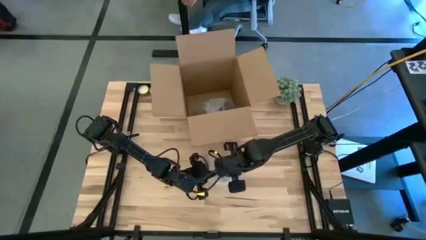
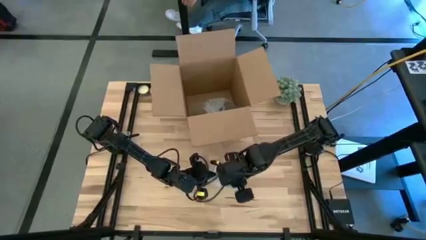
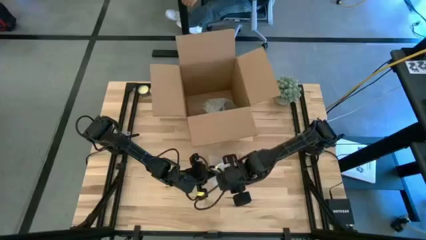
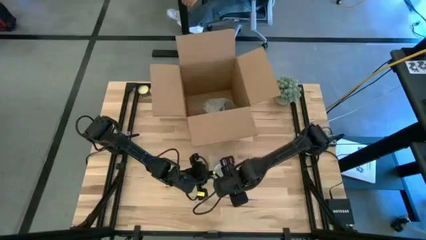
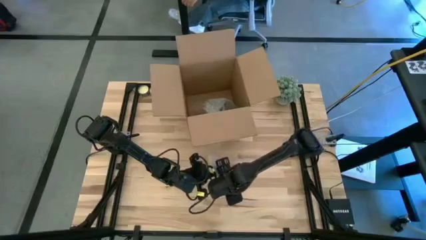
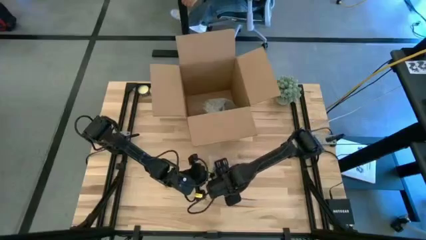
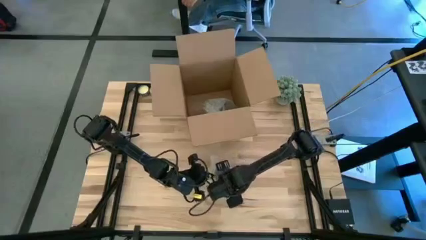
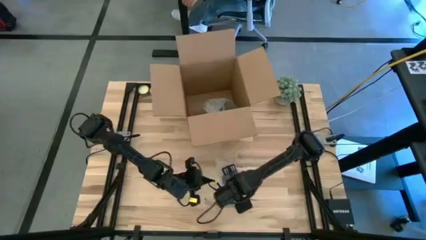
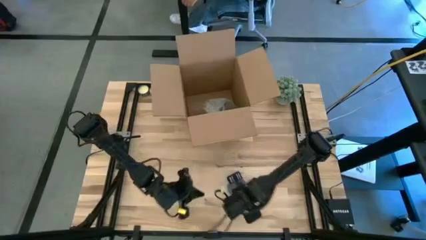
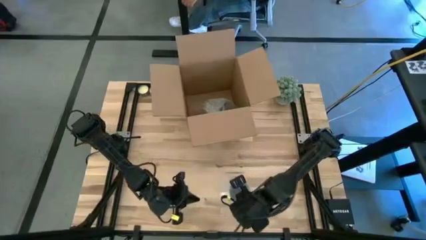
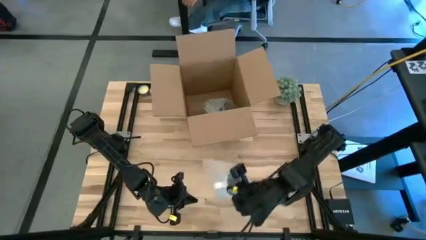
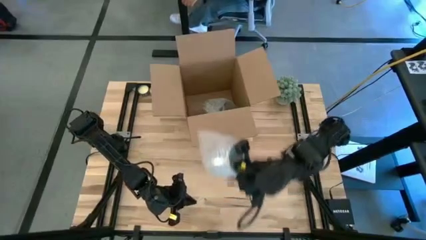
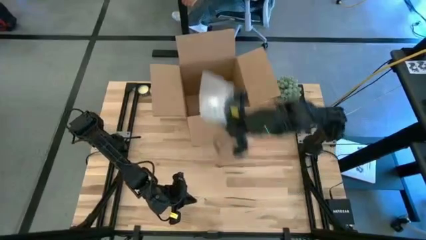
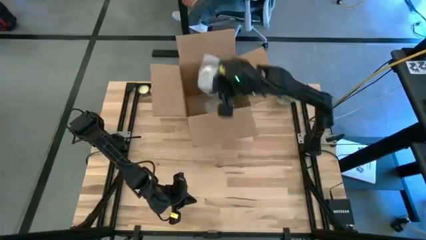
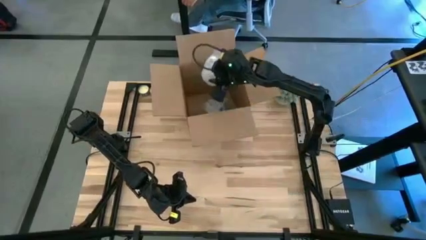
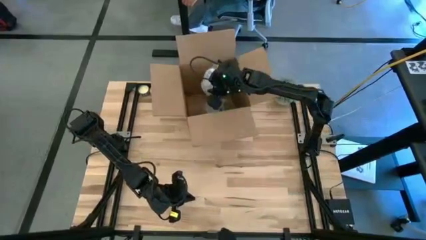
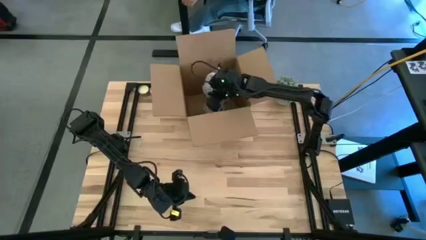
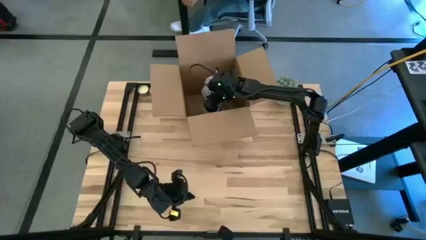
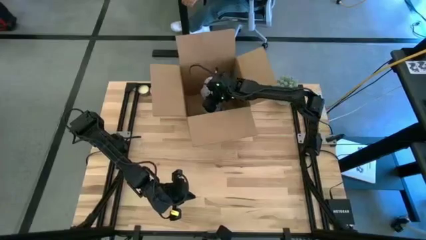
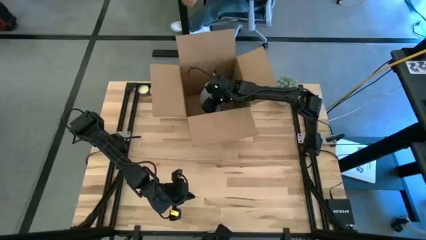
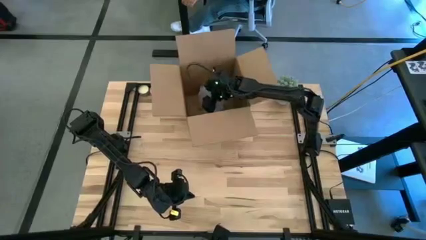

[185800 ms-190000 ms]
Task: wrap mug
Put the wrapped white patterned mug into the brown cardboard box

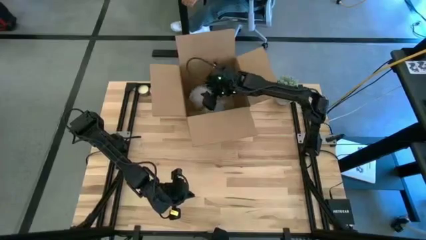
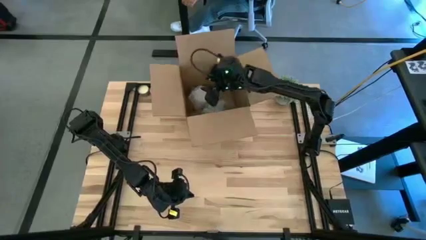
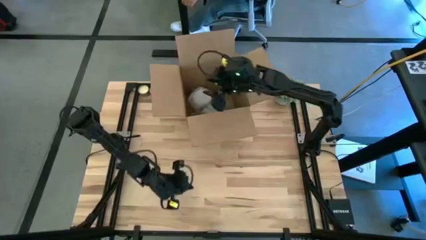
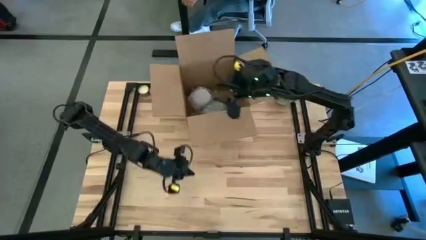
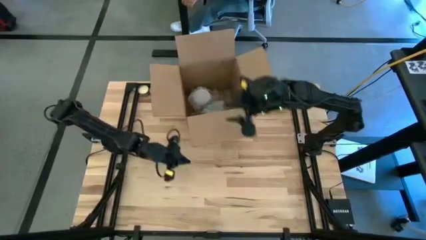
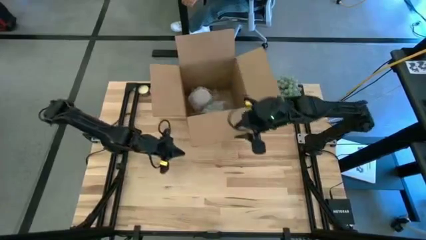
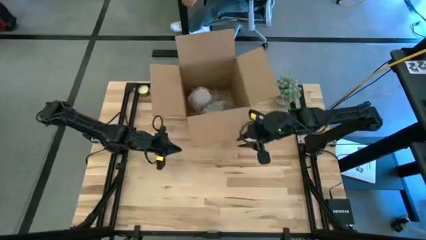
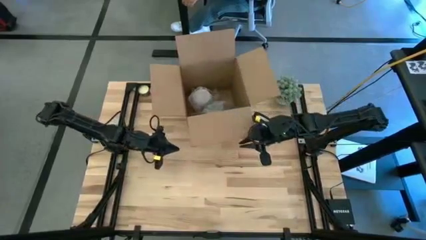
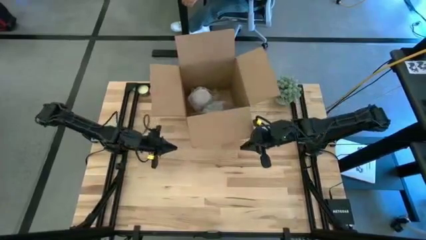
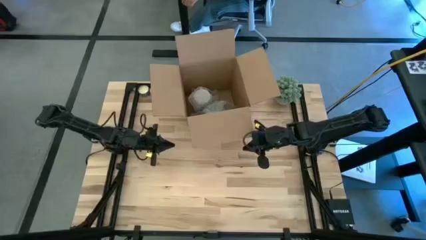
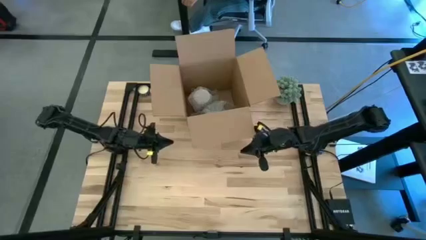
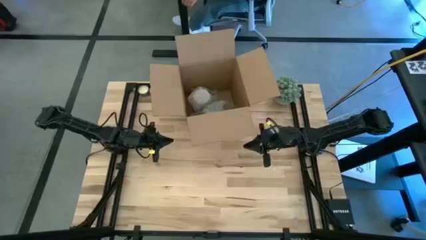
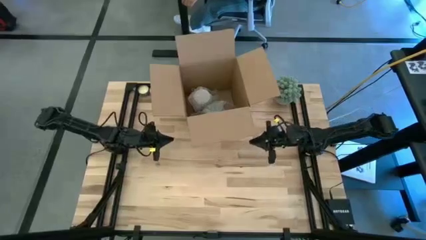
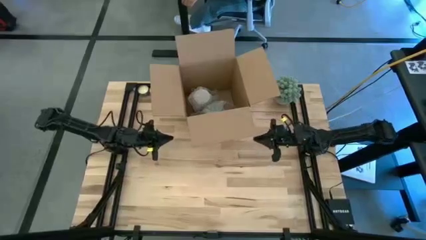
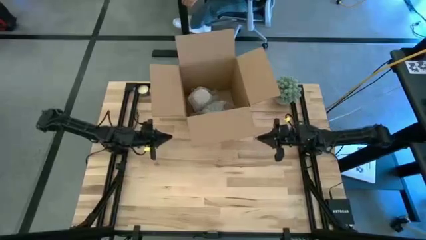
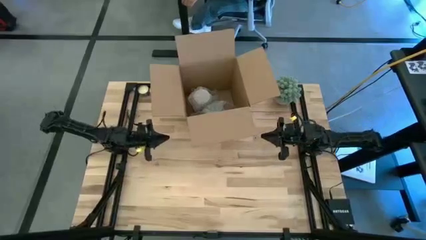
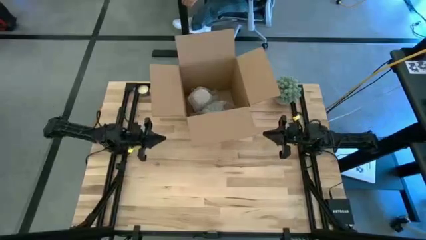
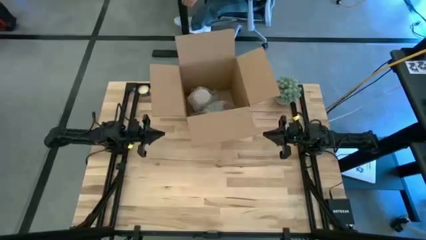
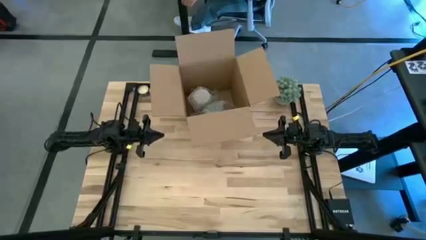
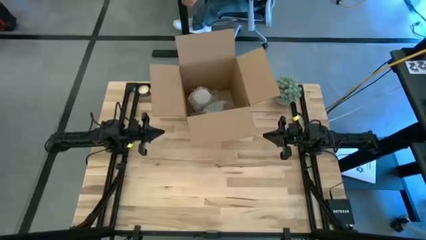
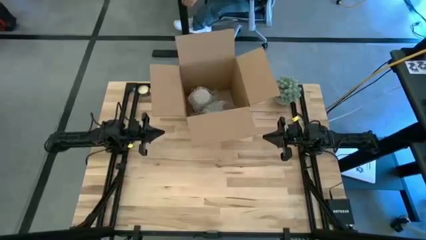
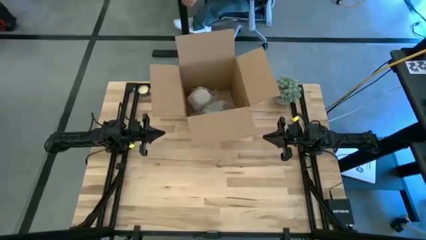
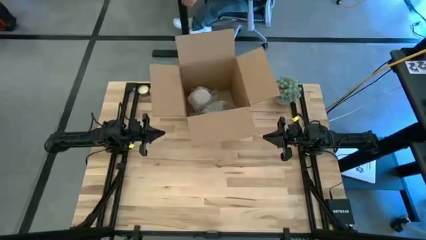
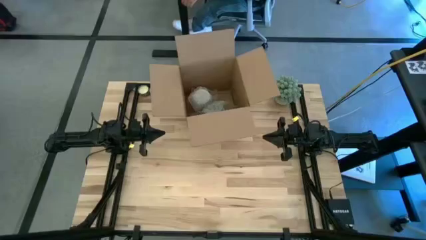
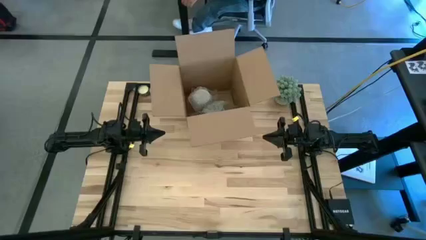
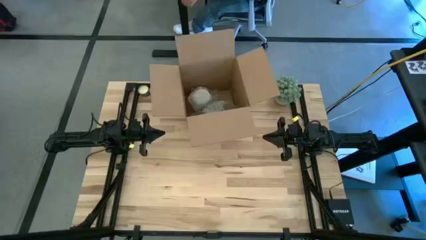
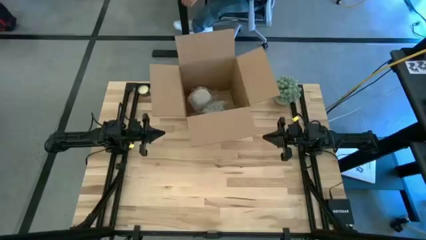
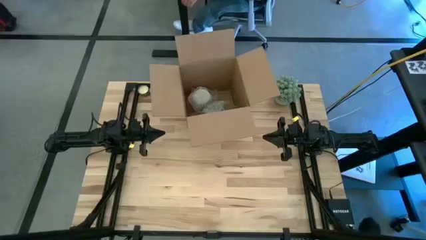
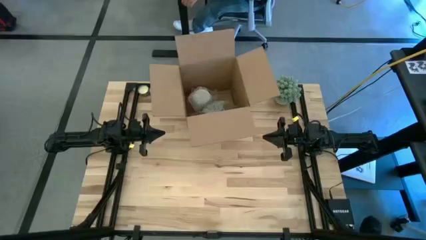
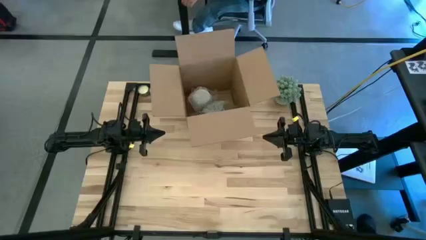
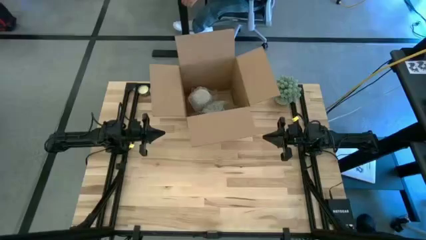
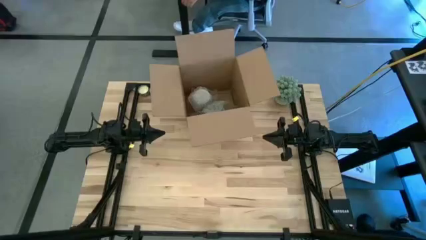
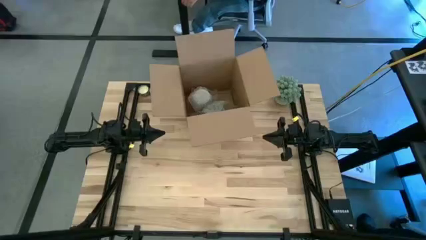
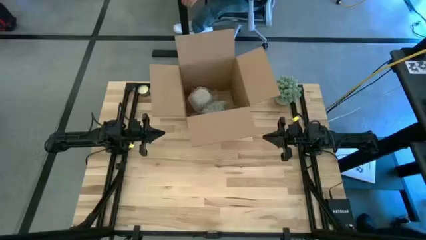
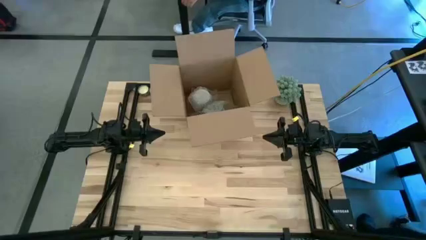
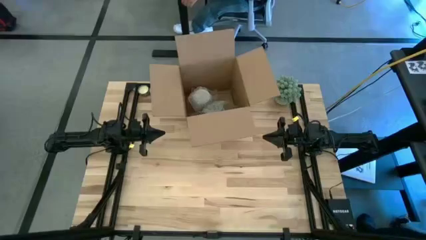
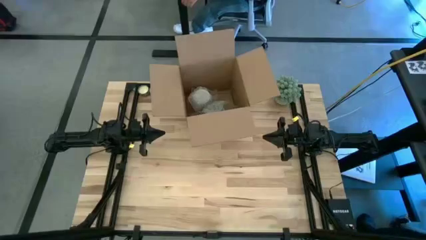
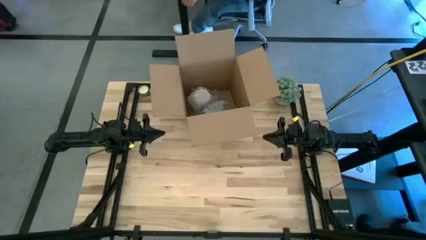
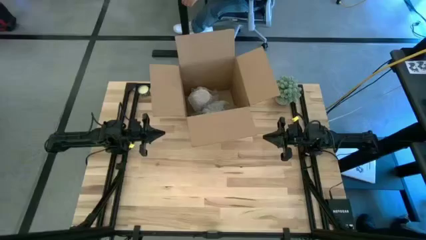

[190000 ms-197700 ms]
Return to Home Position

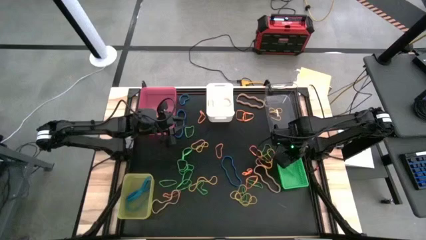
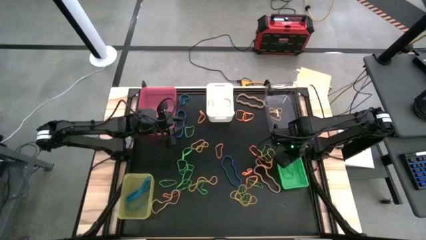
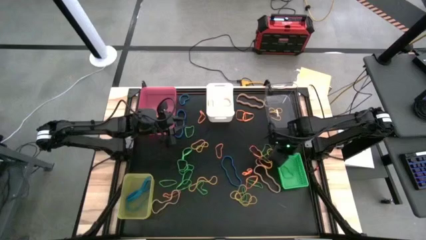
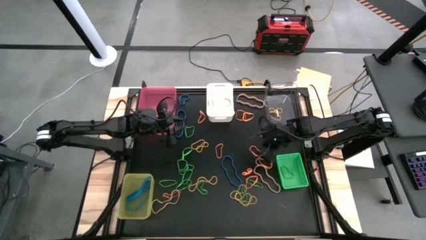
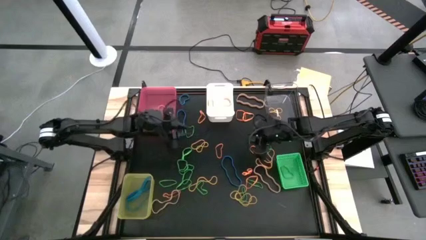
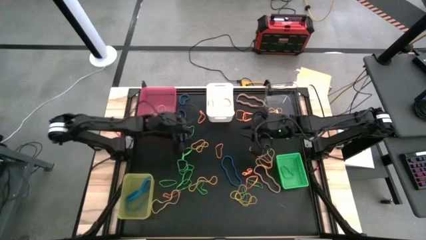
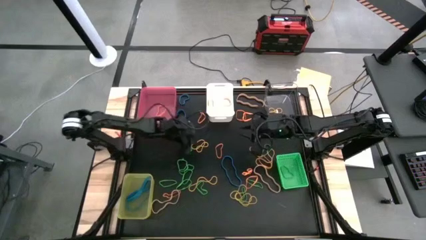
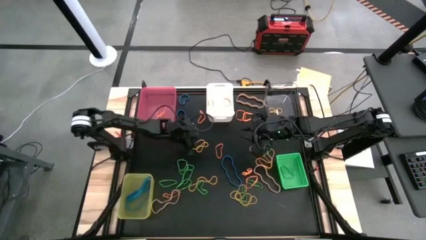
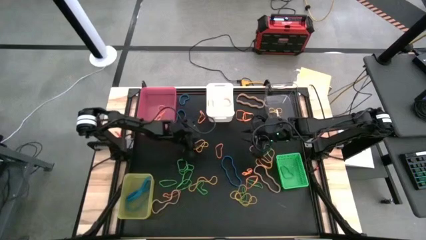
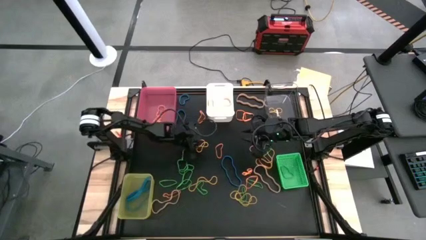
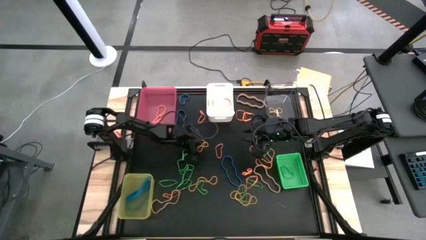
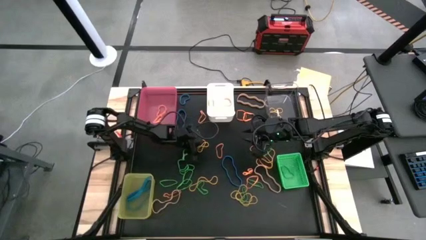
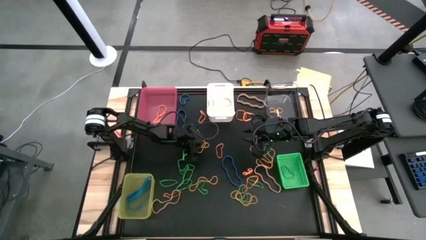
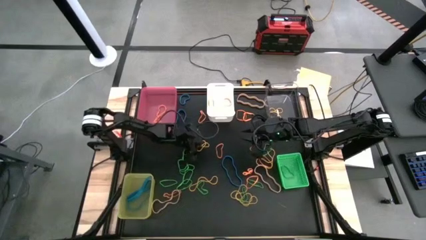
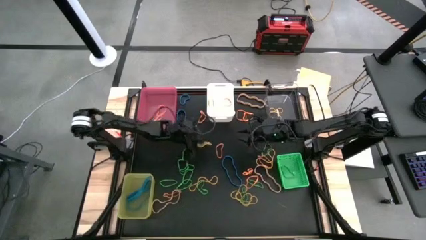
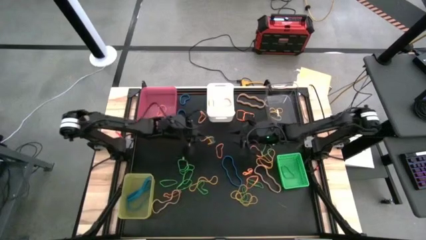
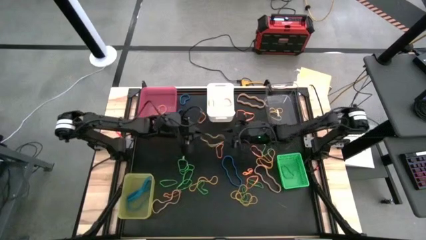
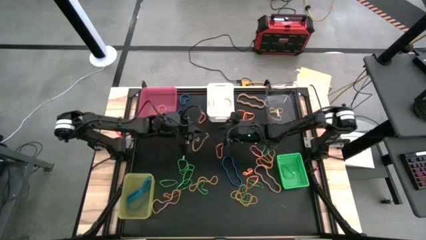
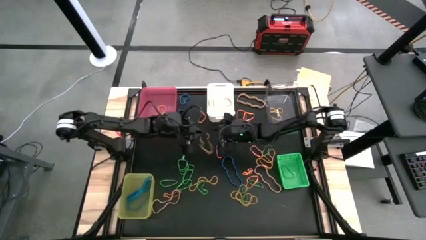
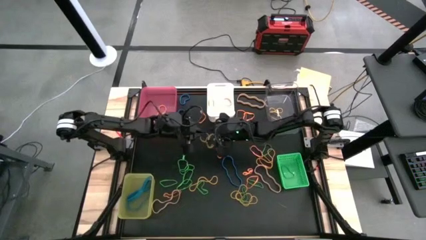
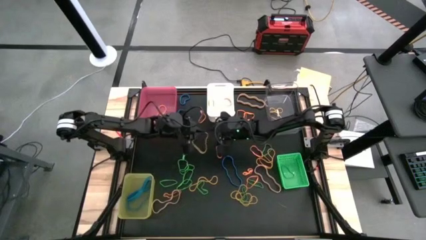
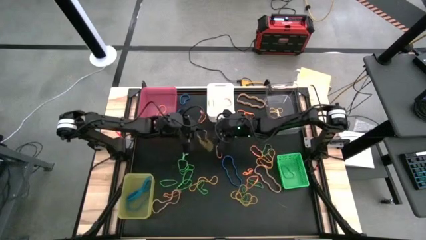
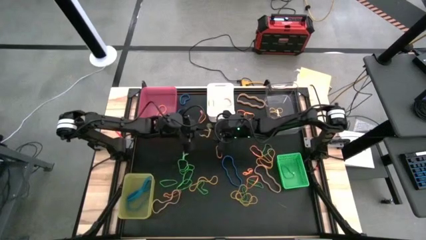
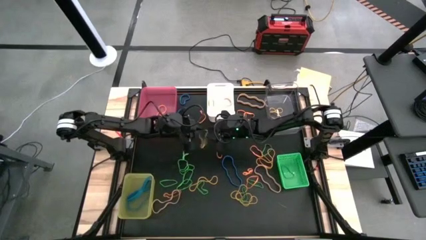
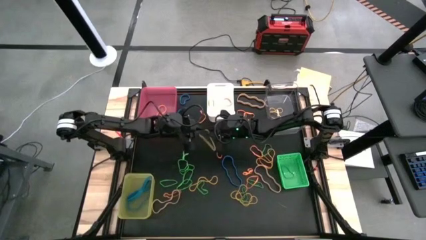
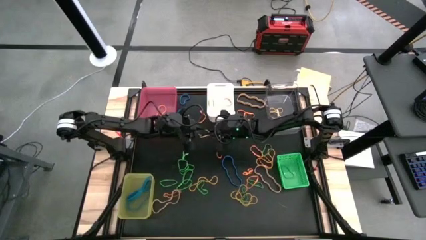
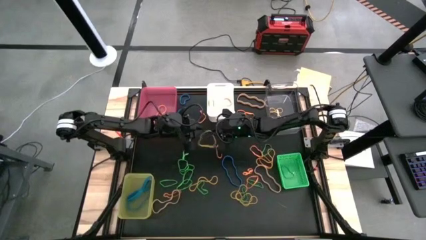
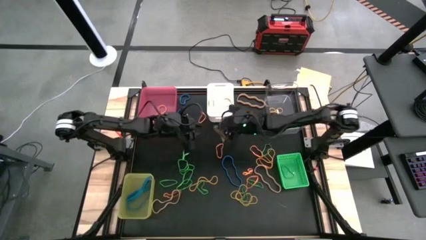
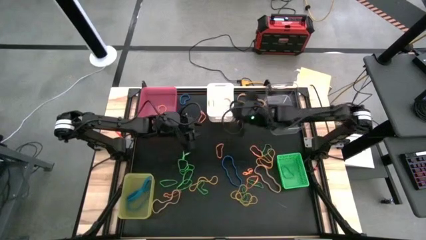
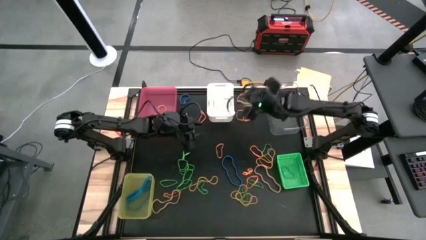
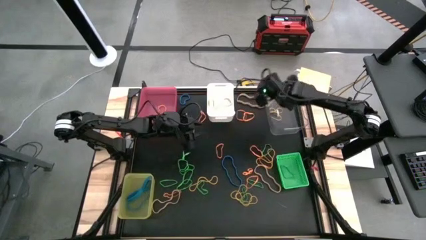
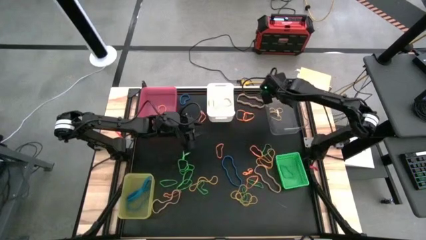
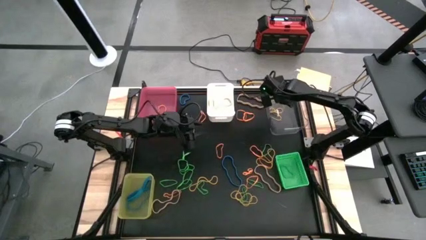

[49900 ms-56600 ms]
Task: Sort rubber bands into baskets
Put the yellow rubber band into the transparent bin
